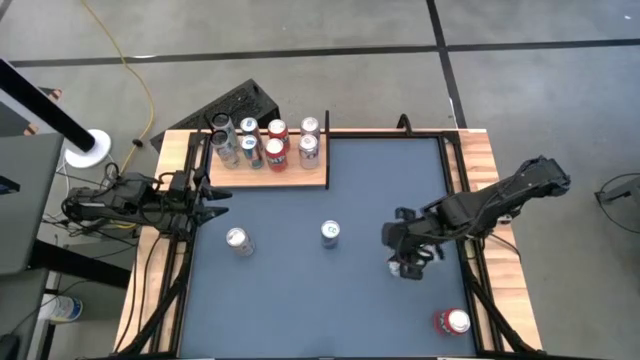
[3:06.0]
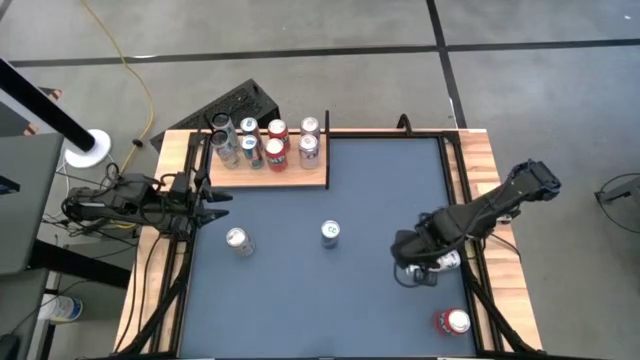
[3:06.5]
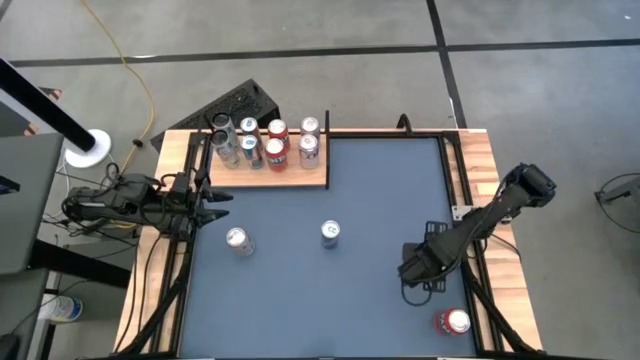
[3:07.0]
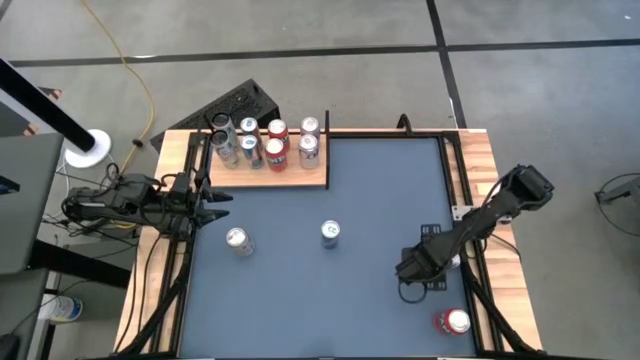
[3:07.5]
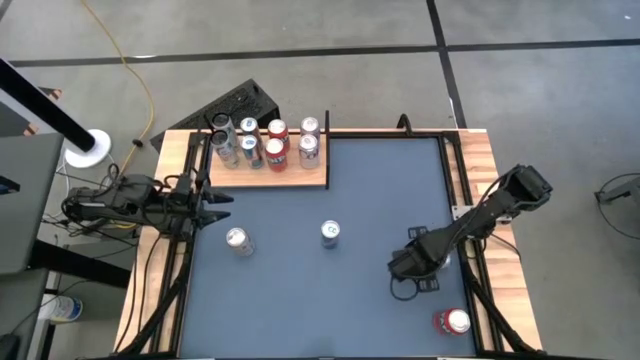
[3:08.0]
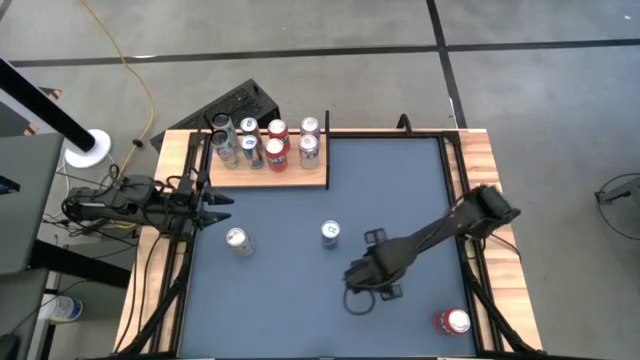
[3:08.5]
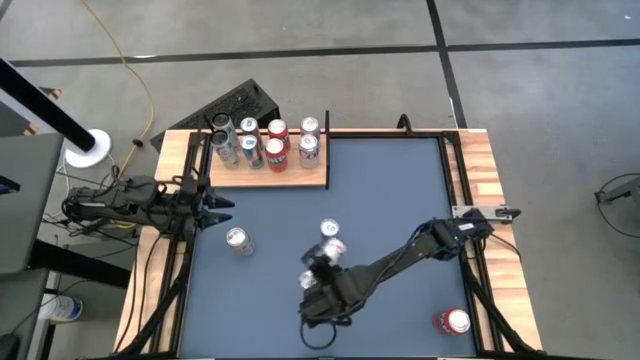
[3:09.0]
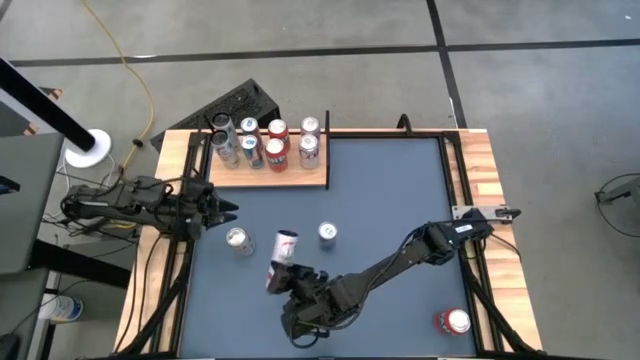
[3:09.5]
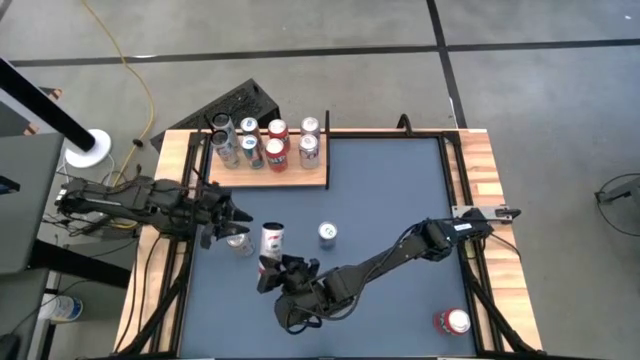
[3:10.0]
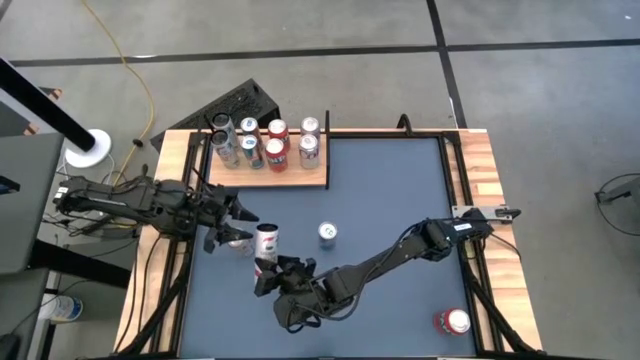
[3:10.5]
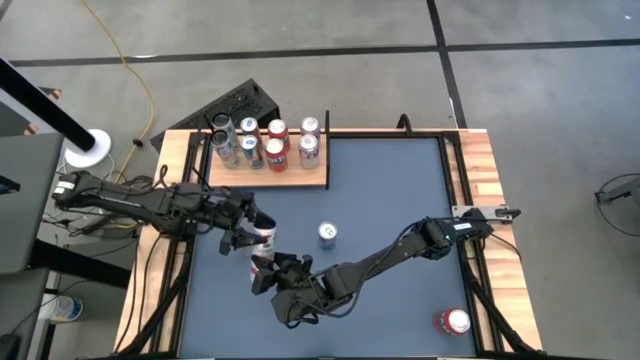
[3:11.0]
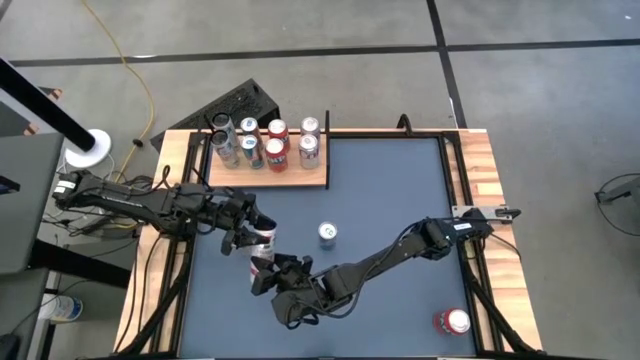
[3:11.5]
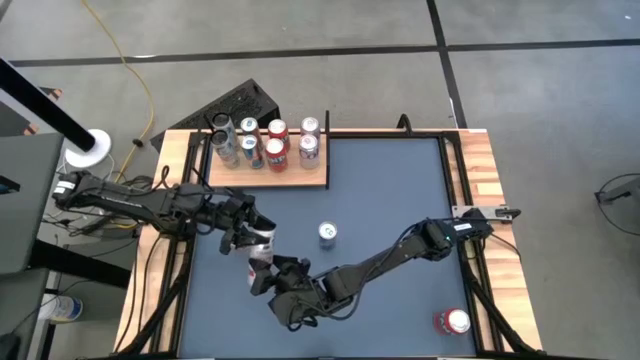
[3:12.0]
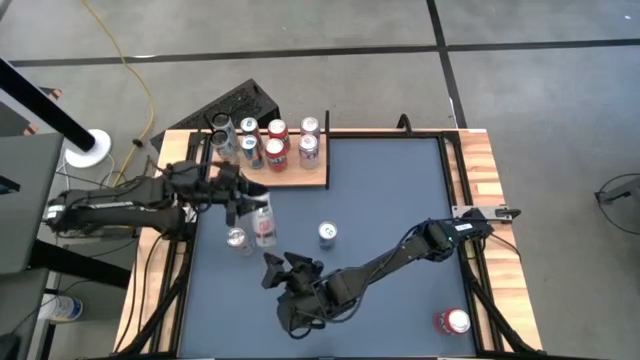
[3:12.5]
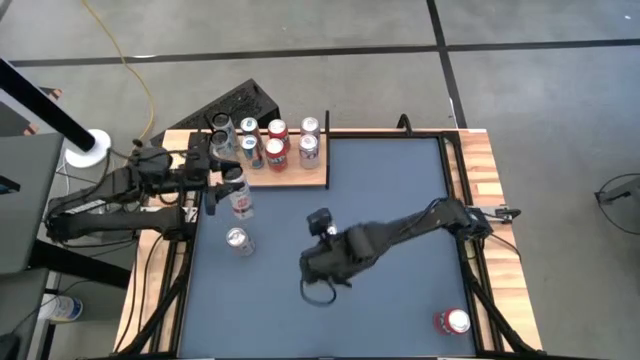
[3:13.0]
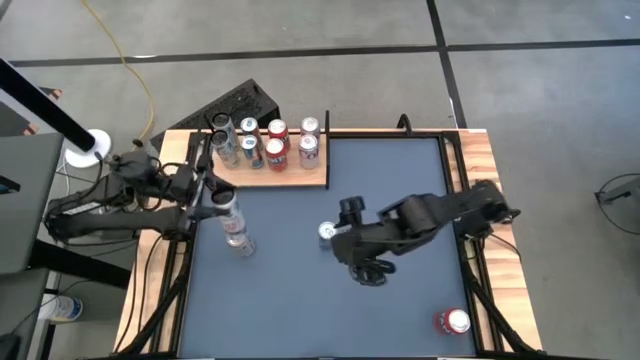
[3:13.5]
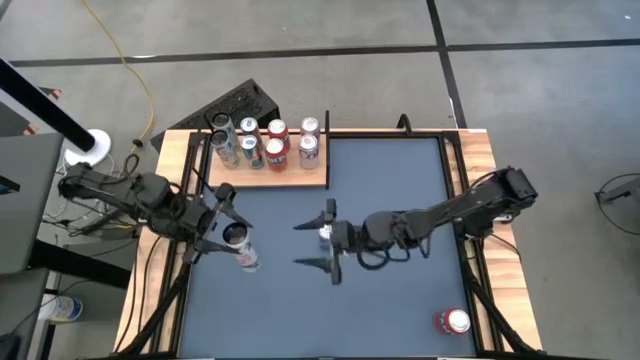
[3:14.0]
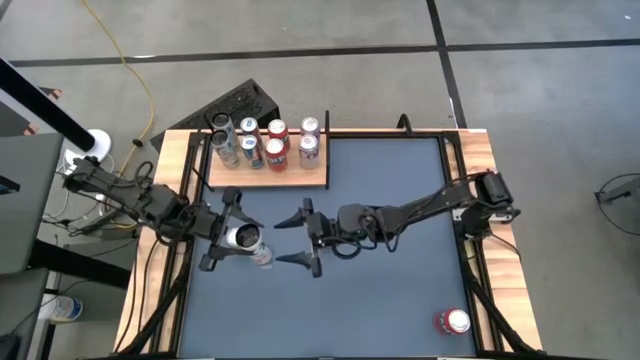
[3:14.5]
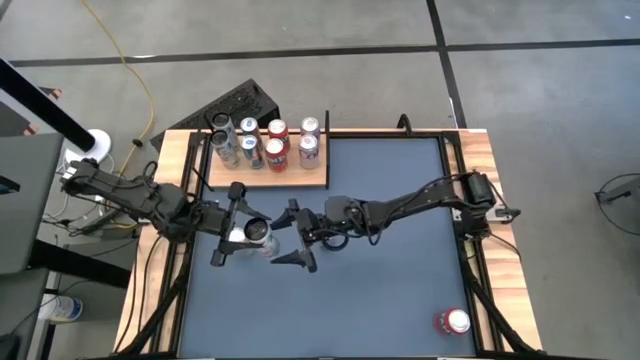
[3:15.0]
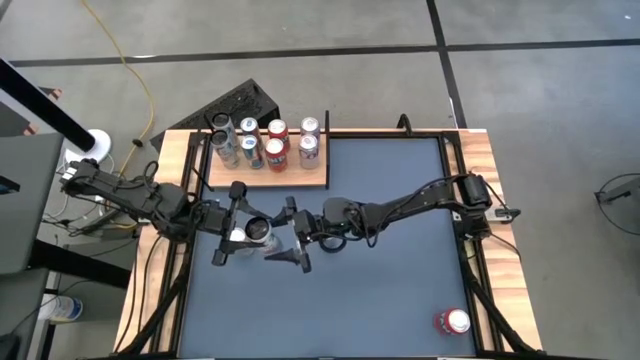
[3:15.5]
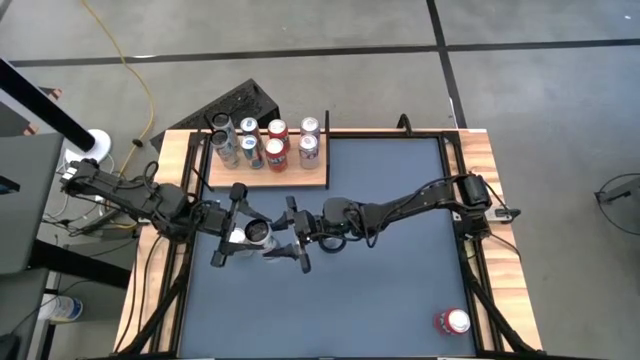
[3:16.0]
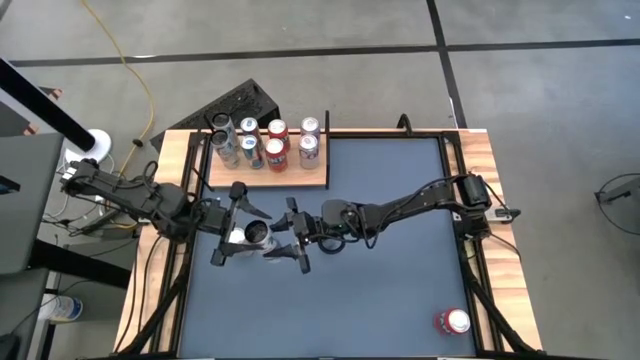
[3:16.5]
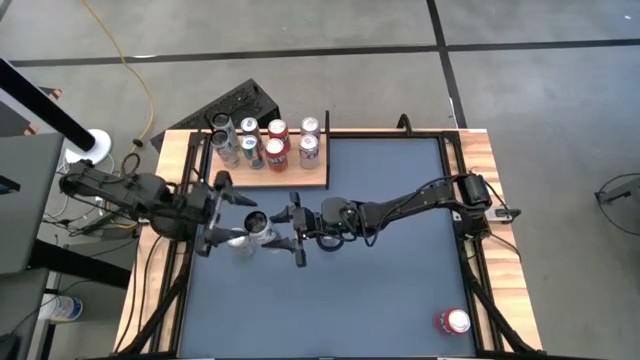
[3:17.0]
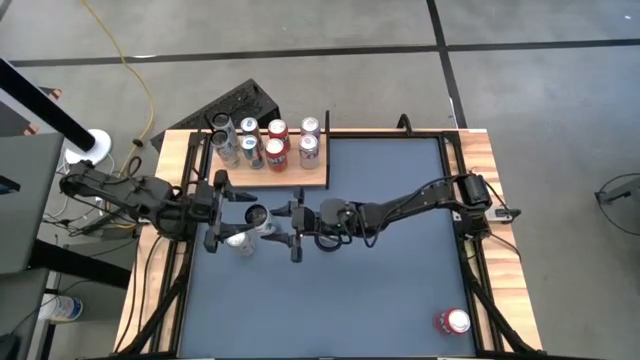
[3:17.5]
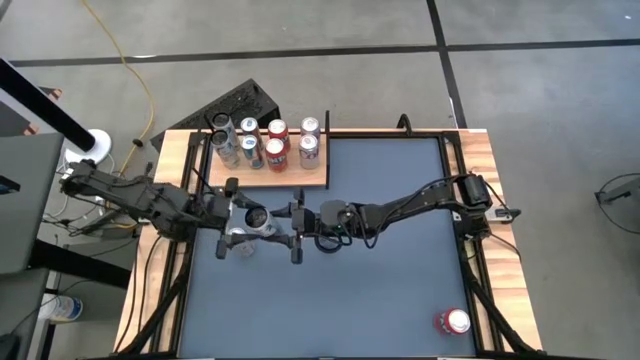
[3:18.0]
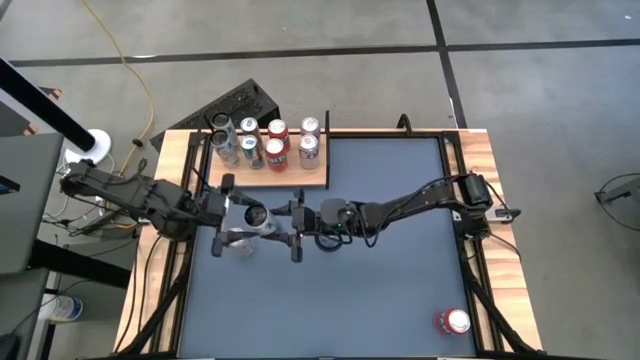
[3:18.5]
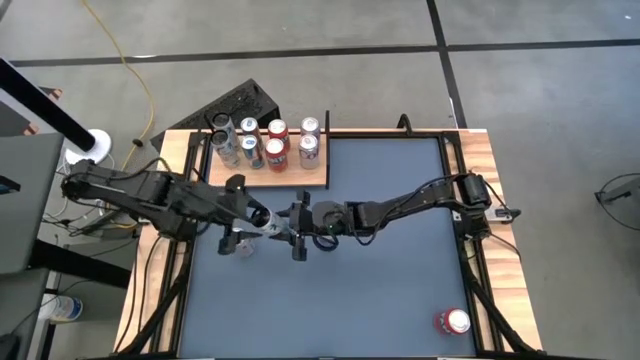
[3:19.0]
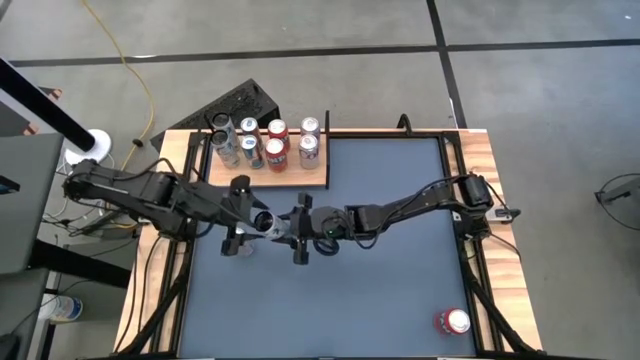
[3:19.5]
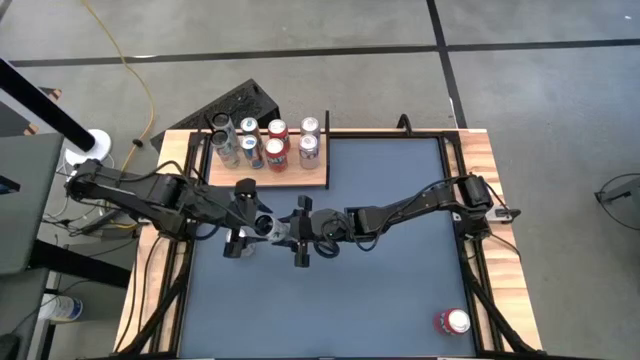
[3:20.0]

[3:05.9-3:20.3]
Task: Place canned beverage on shelf
Put the white pink soda can on the shelf aligned with the other white pink soda cans

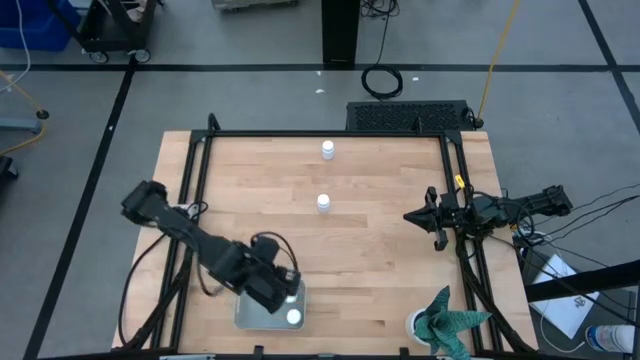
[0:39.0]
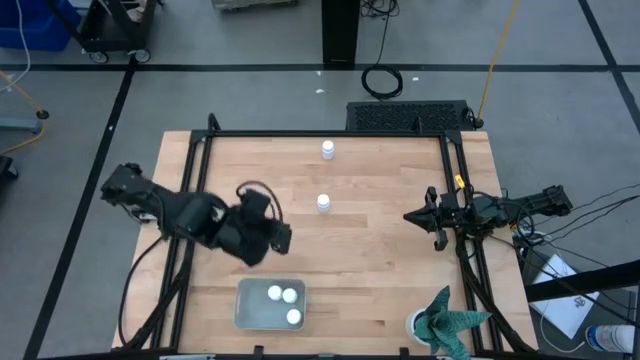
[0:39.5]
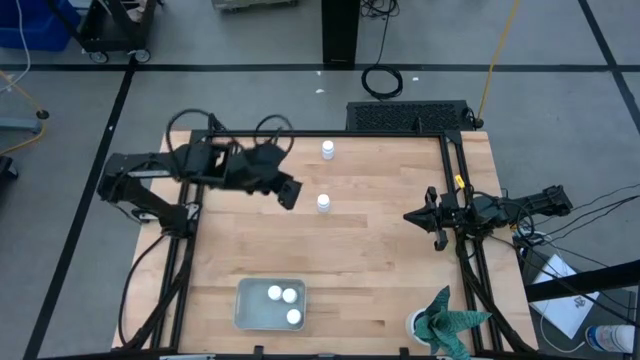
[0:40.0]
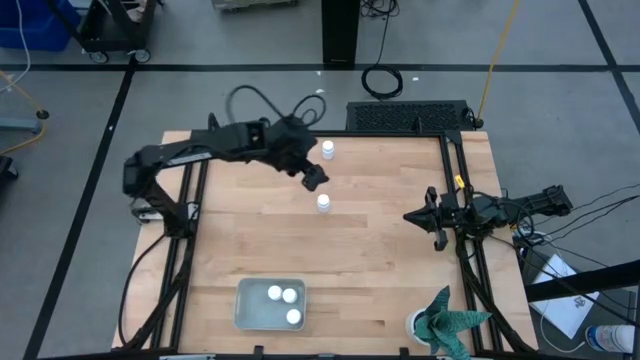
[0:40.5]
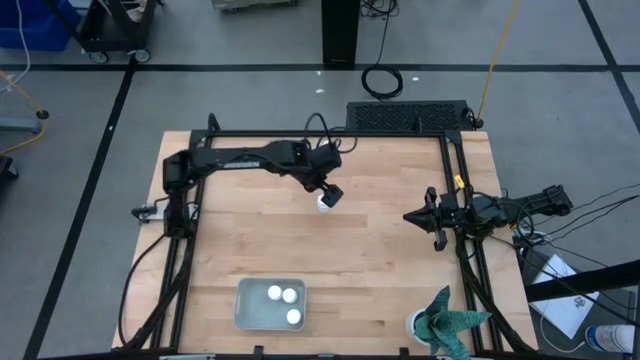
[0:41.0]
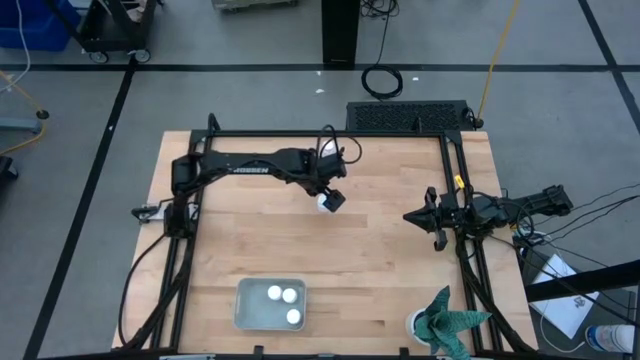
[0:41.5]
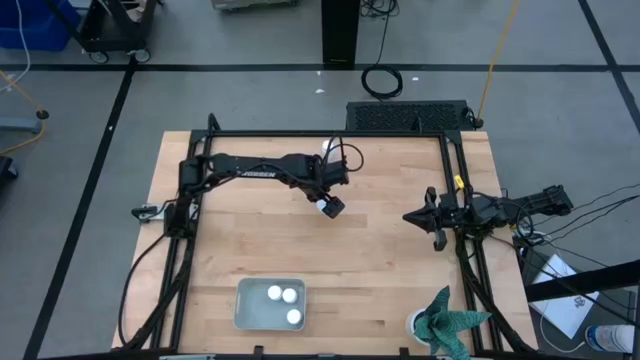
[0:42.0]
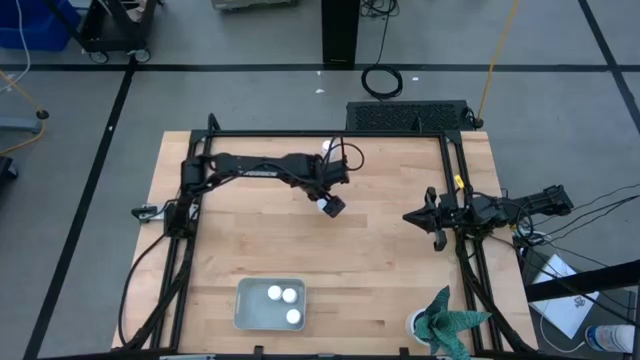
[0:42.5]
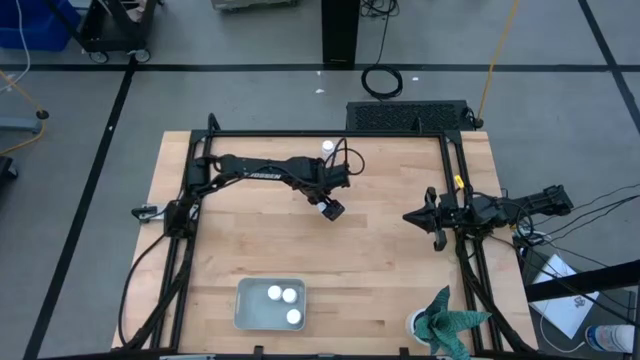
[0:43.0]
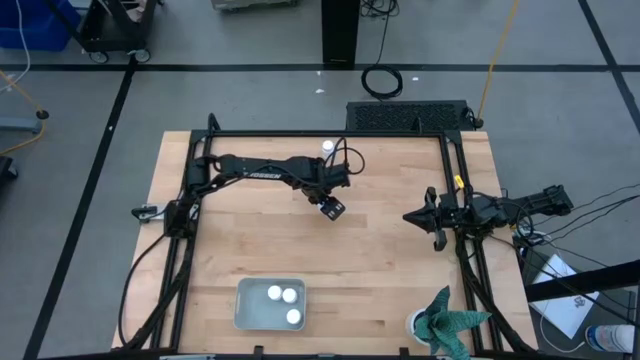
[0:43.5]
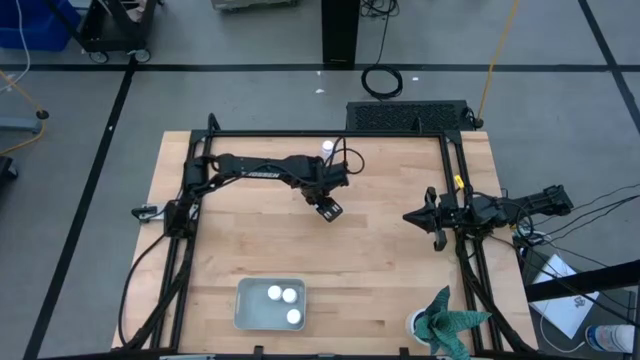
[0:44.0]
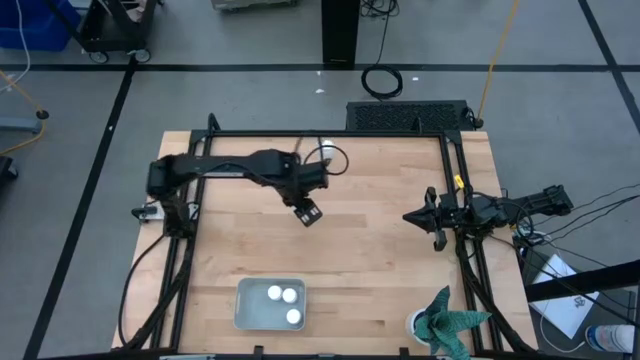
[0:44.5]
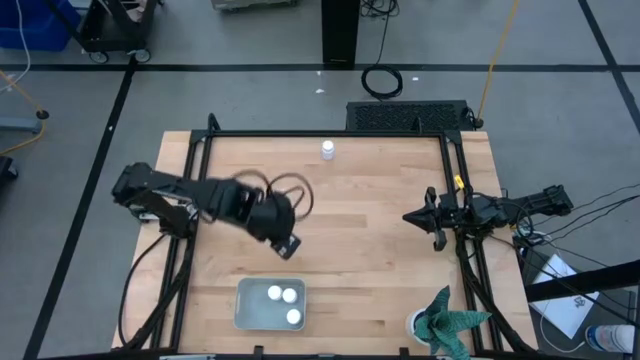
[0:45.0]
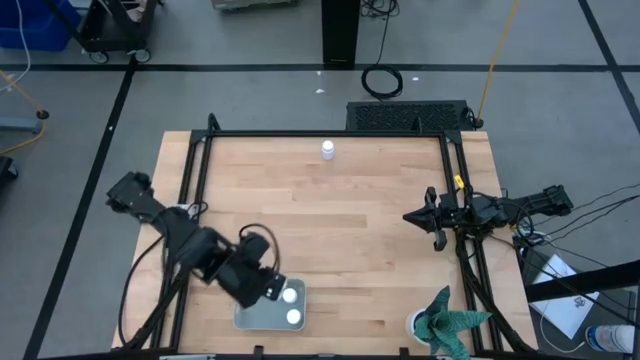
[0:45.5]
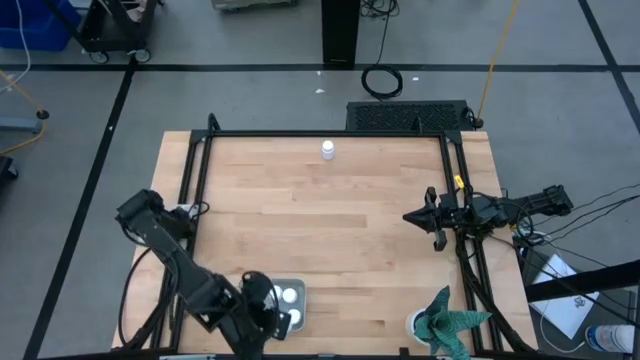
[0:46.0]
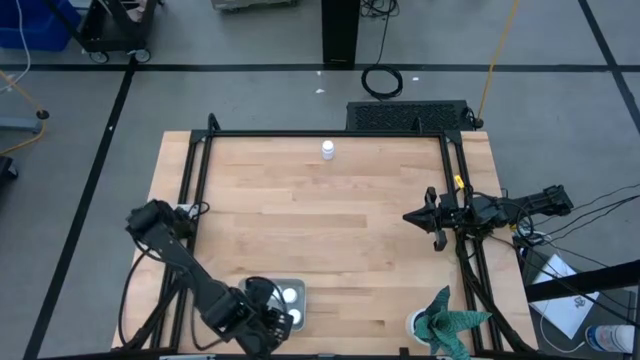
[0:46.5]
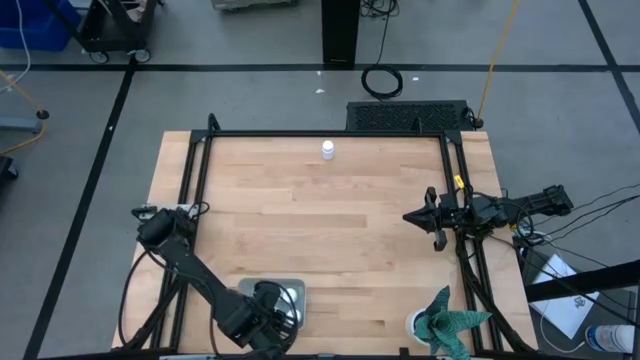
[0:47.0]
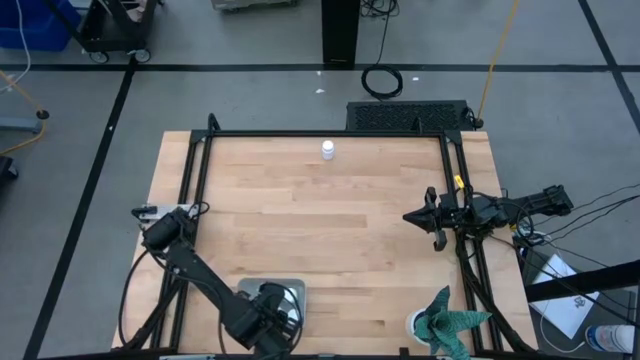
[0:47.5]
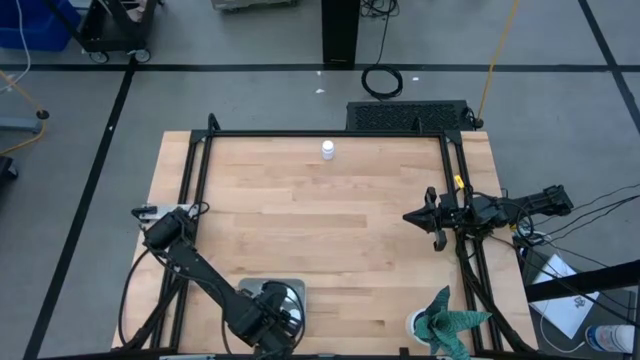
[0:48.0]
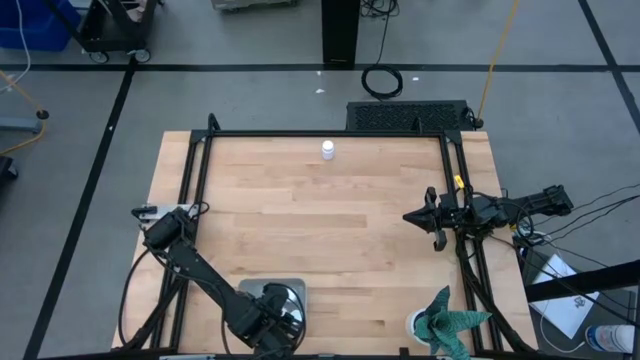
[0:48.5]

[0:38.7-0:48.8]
Task: Pick and place pill bottles into a basket
Put the white medicine bottle into the gray bin
